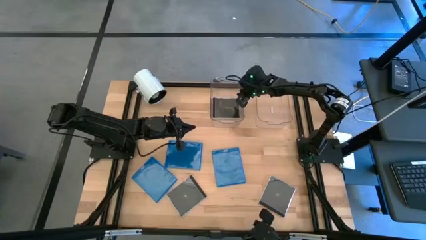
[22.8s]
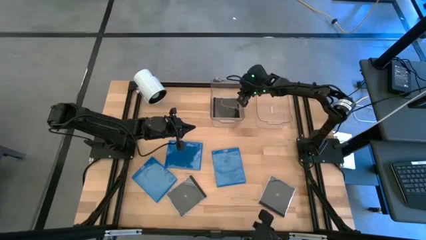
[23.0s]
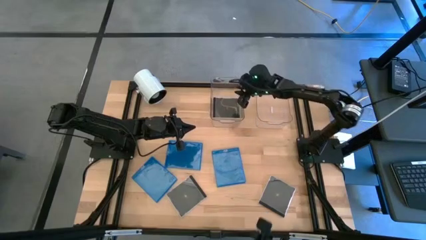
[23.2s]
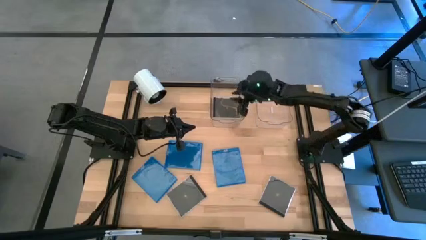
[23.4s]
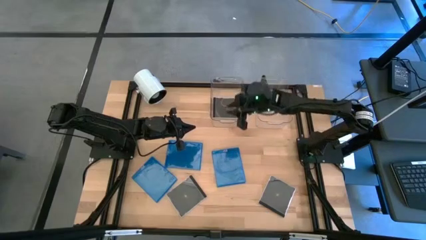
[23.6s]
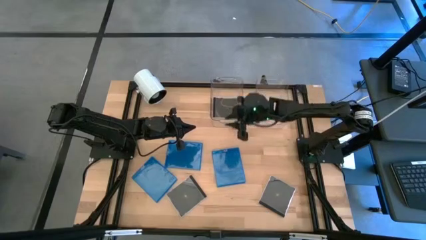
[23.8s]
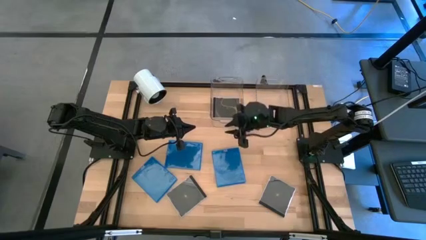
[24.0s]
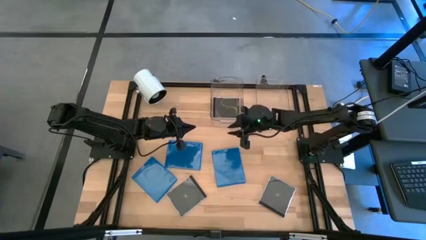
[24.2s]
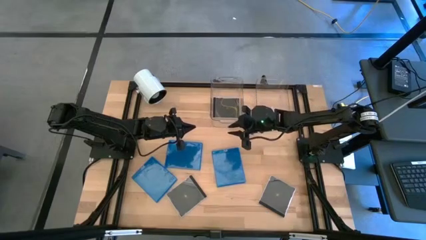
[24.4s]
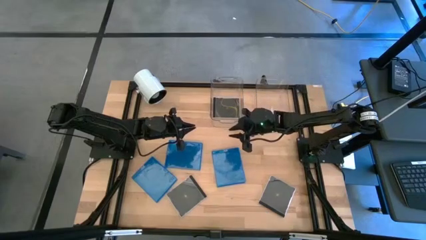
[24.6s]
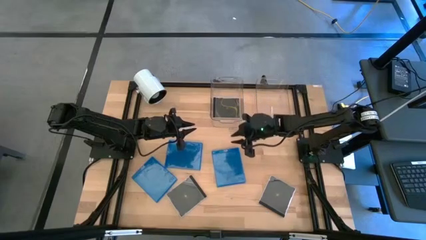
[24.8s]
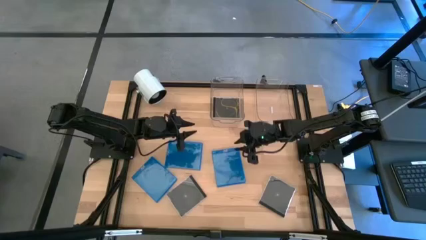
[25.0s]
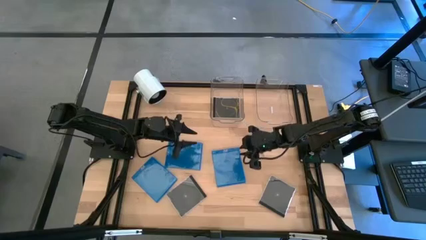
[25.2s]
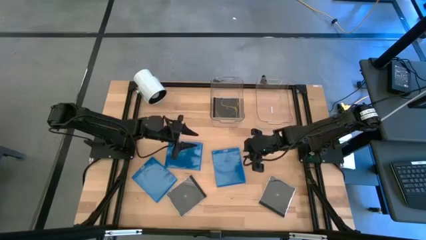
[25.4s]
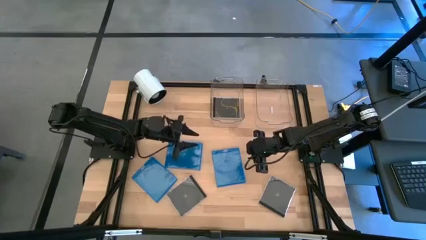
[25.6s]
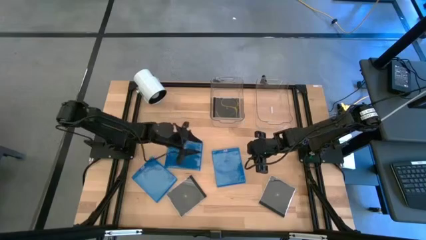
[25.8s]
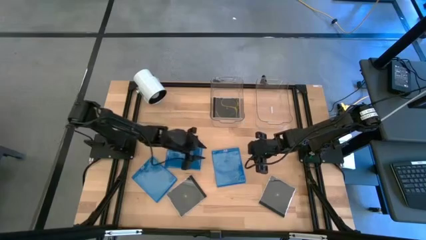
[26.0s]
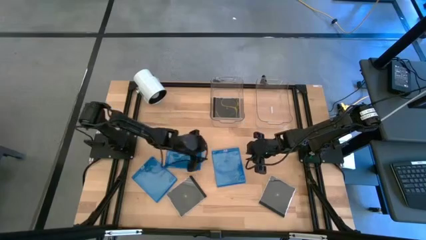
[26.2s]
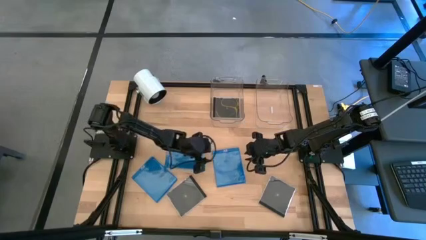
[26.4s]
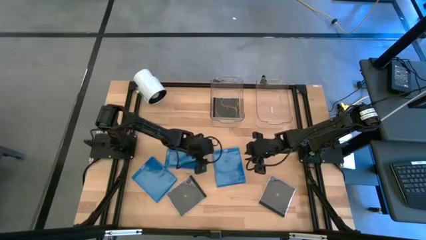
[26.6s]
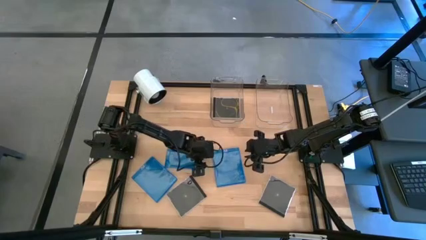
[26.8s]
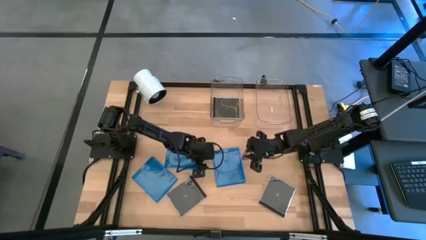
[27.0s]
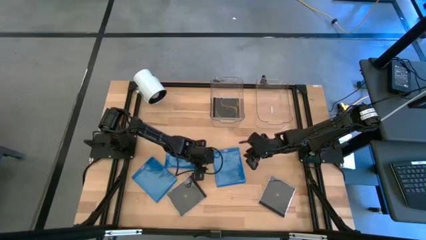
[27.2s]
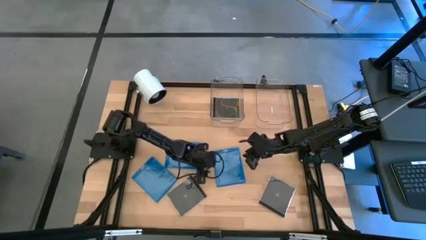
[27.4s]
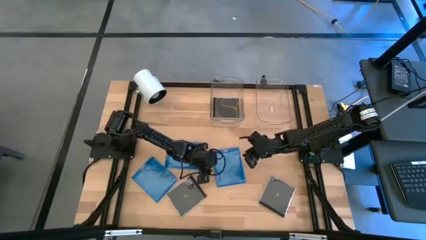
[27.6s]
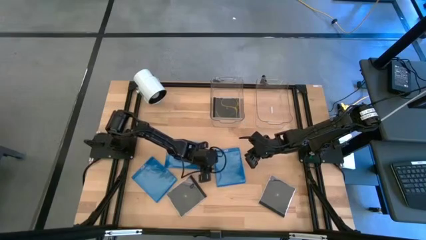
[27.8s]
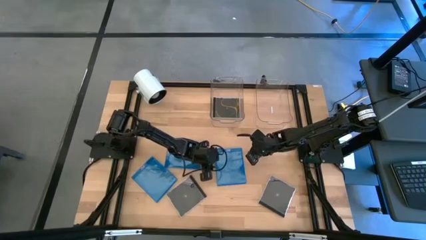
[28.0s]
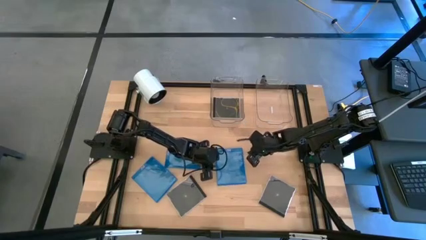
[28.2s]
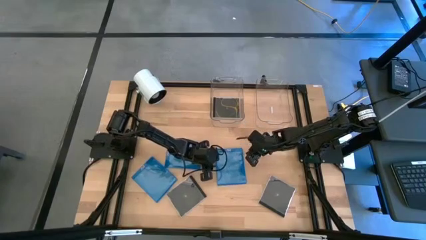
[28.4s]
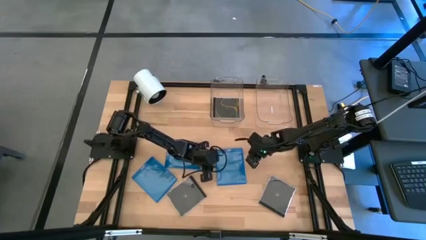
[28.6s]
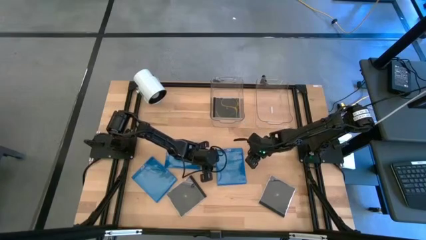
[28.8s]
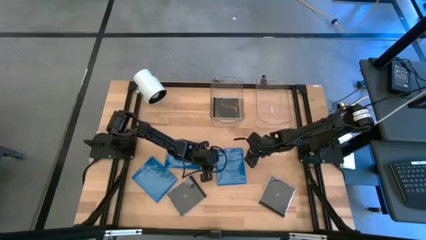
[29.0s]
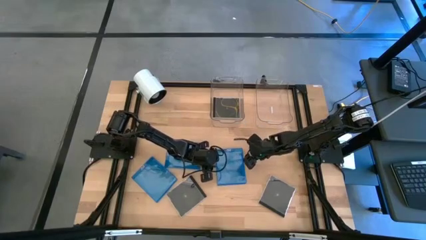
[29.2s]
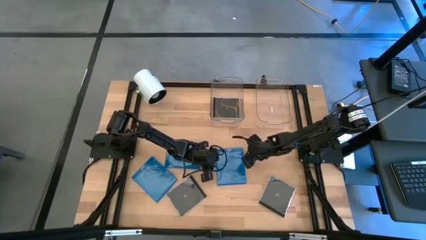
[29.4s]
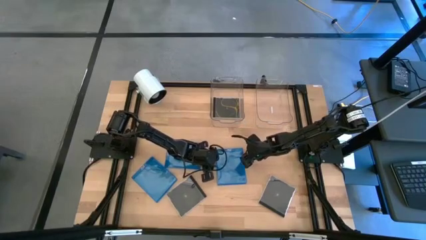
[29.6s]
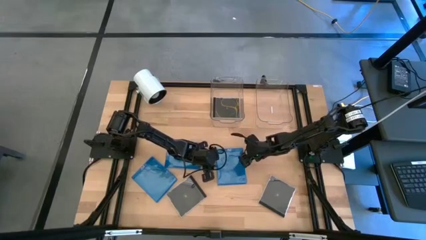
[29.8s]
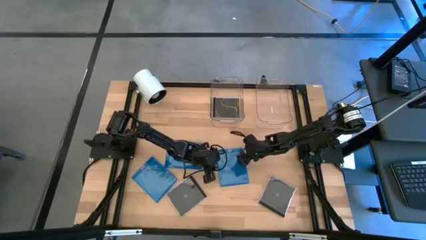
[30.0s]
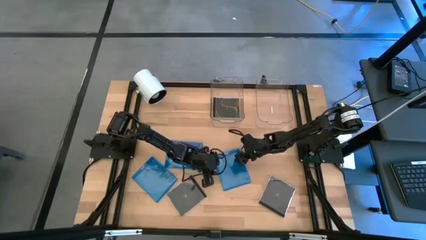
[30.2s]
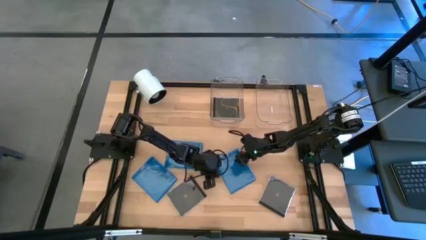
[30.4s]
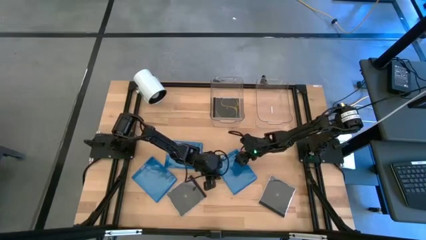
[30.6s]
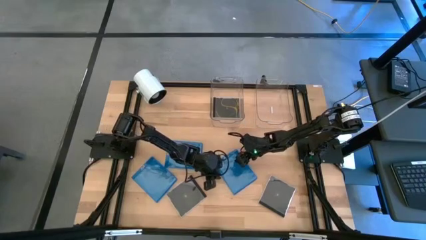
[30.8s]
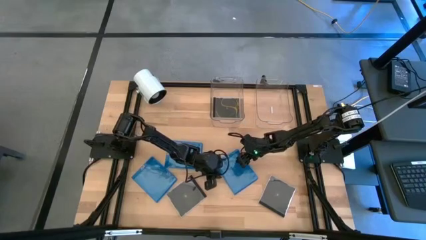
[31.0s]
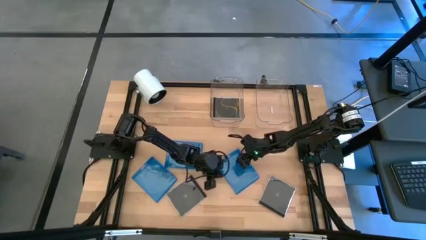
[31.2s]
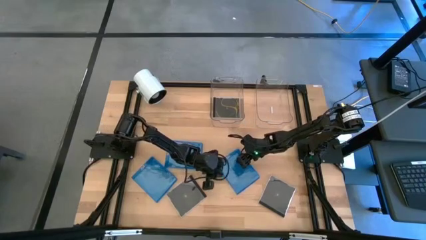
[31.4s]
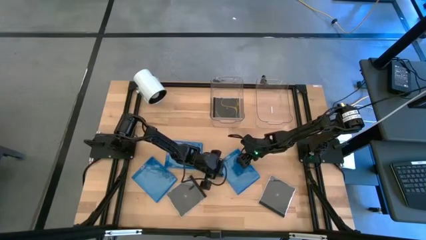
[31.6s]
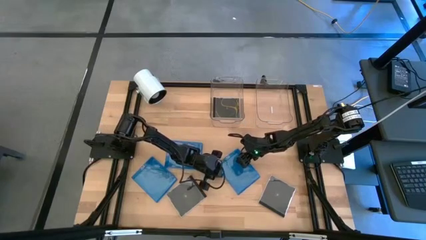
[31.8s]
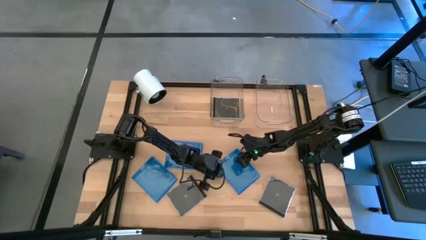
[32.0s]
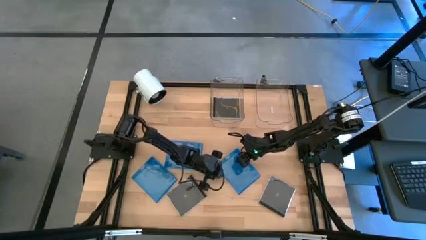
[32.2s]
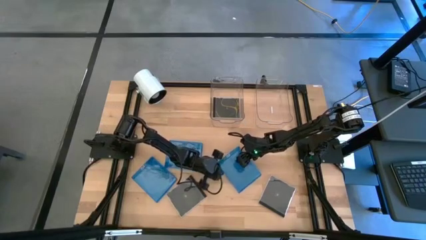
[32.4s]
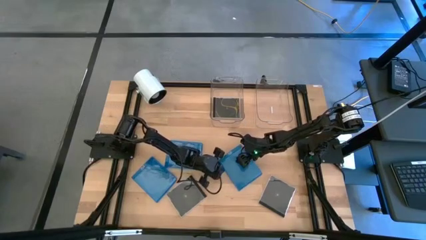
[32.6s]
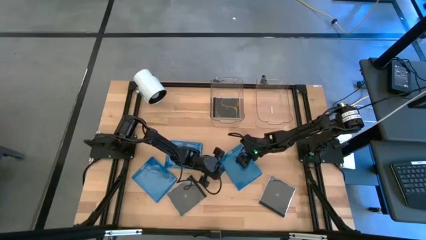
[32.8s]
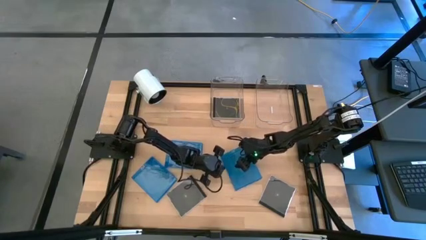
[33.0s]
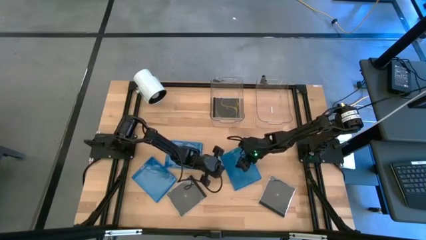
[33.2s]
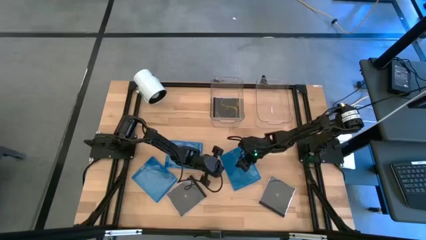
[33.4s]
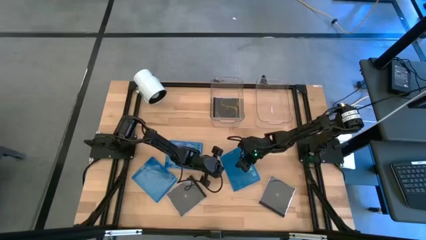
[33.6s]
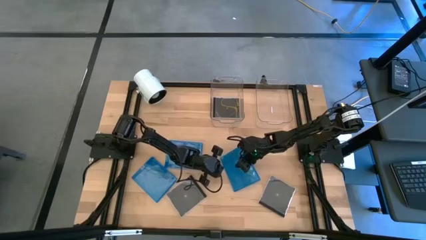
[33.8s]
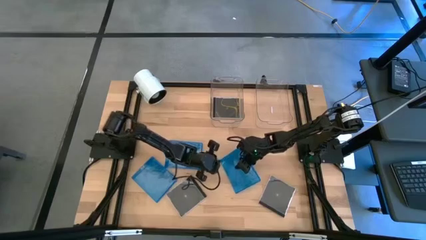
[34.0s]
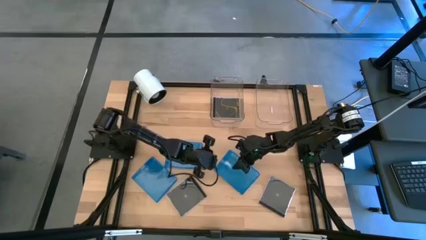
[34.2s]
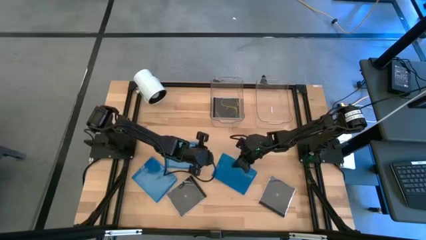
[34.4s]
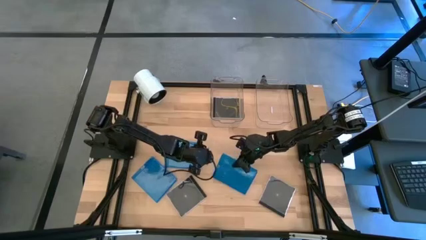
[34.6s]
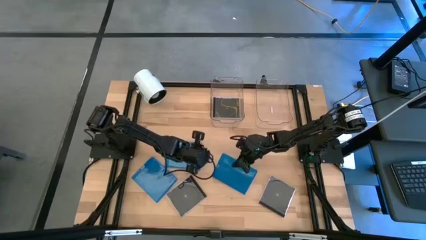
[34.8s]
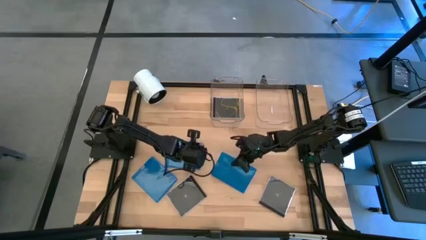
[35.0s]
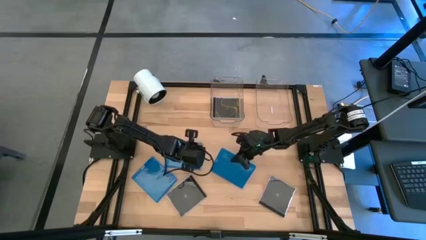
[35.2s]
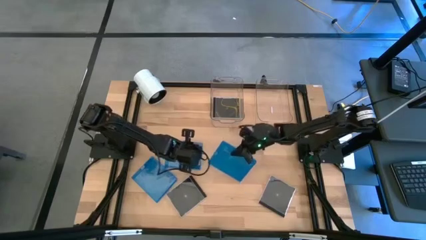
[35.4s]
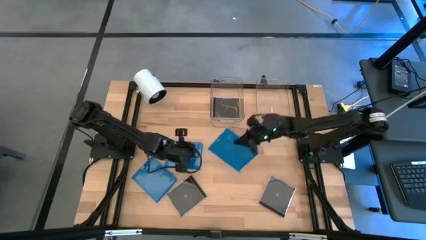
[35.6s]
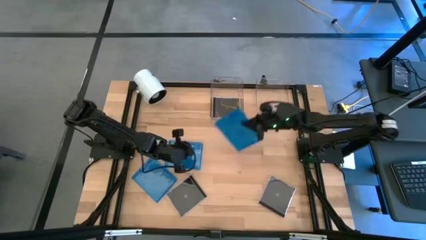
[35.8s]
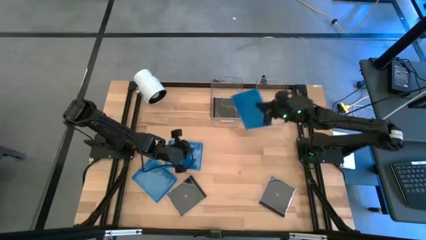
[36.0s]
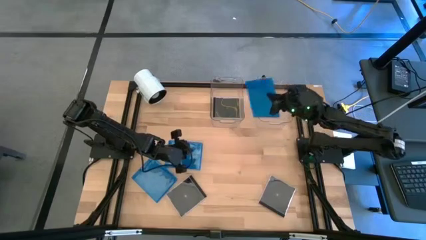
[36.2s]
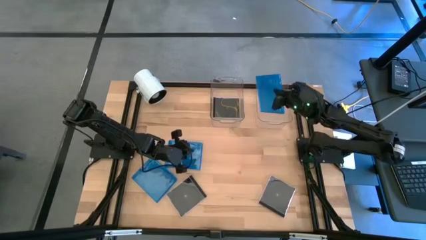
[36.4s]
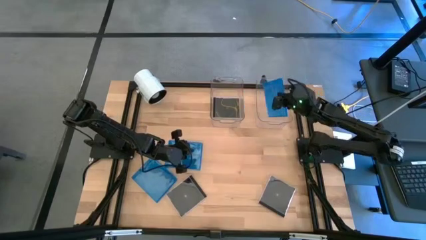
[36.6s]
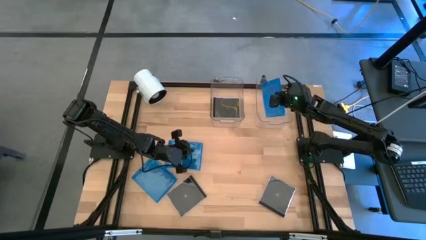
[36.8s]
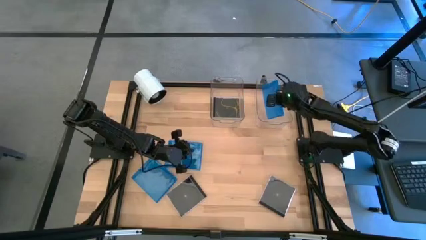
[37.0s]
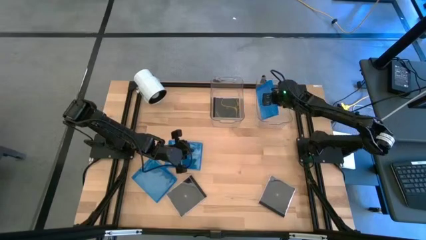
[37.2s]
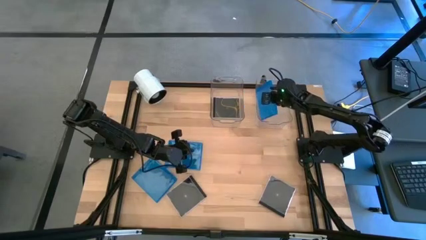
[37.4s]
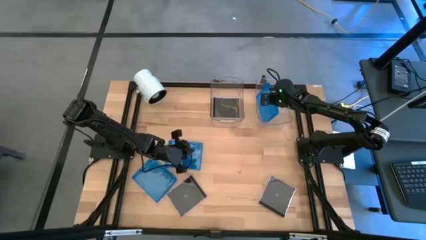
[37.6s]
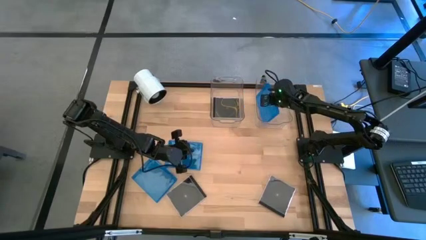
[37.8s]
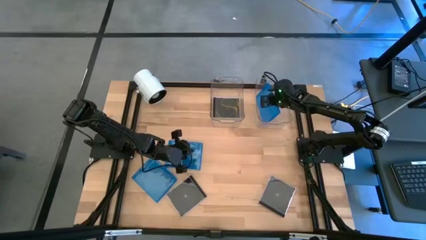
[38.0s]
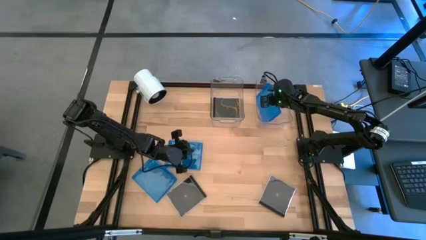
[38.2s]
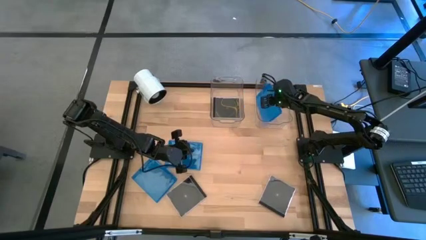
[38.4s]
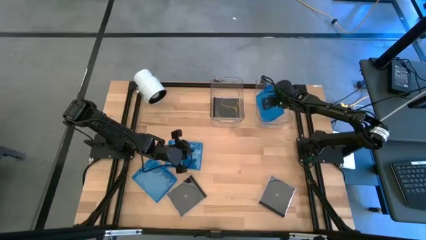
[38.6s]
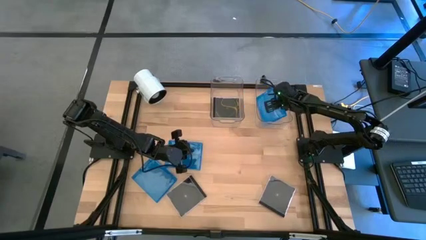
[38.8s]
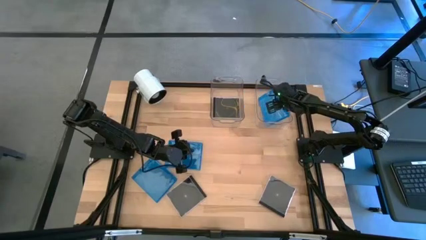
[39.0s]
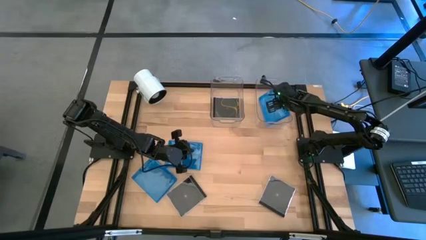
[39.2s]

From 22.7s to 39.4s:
Task: Pick & place jewel cases by type
Put the right blue CD case into the right transparent bin

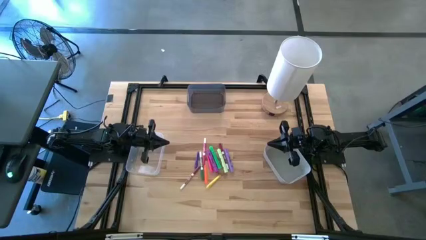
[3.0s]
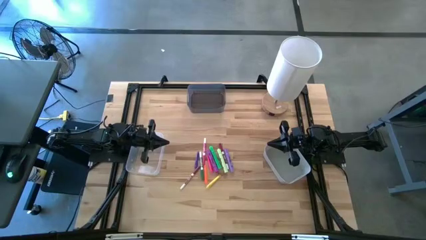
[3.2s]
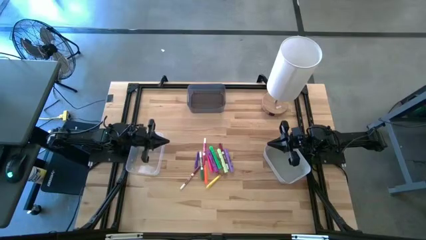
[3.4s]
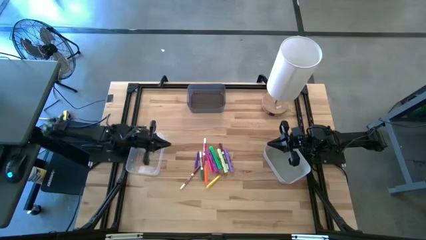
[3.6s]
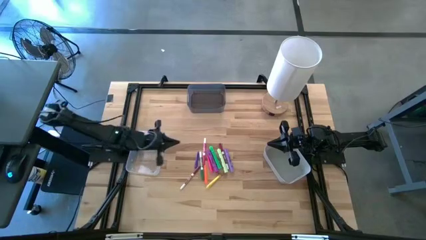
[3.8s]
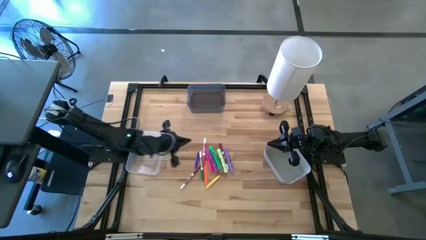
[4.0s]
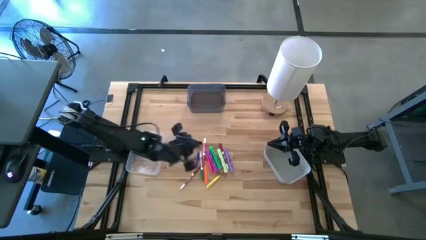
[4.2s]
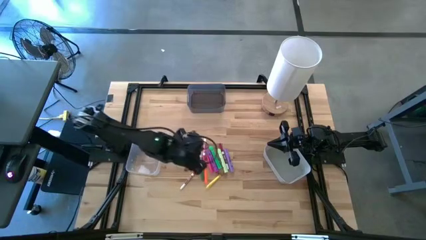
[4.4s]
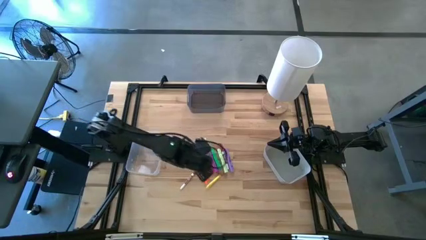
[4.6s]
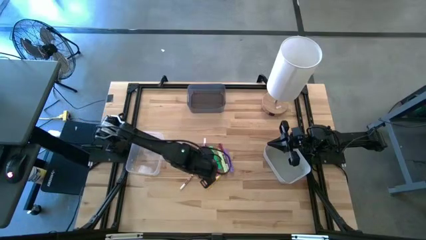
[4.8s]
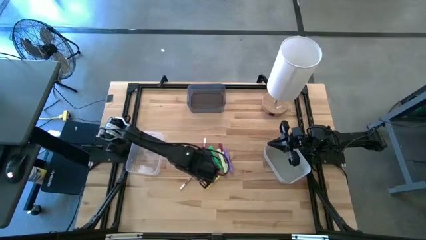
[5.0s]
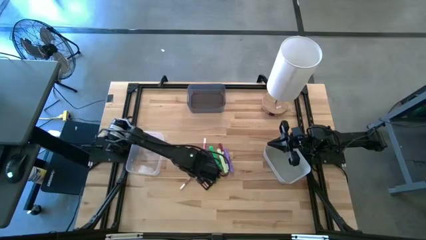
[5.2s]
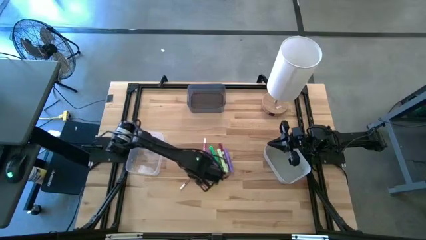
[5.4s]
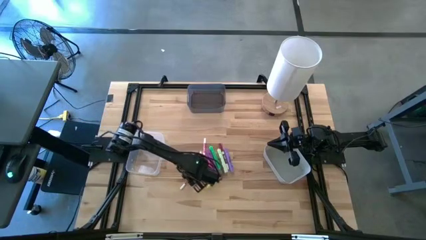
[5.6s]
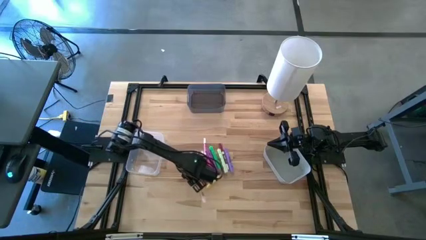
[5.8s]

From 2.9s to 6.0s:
Task: Pick & Place Markers
Put the white and brown marker into the transparent bin
